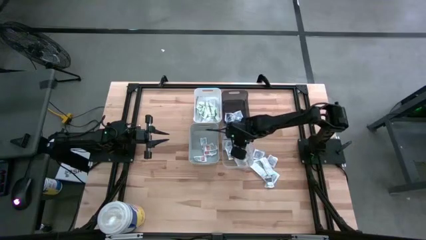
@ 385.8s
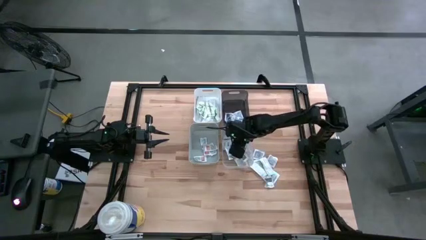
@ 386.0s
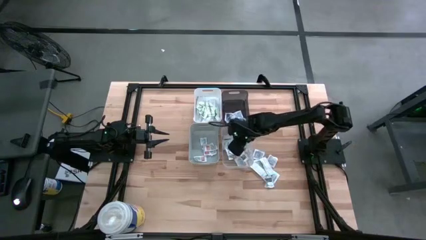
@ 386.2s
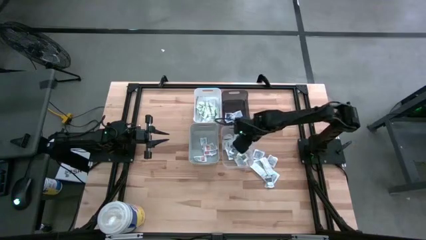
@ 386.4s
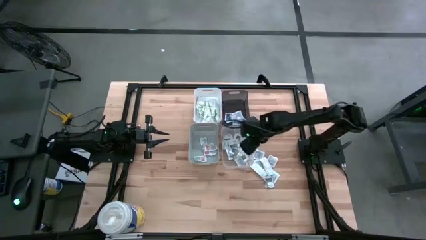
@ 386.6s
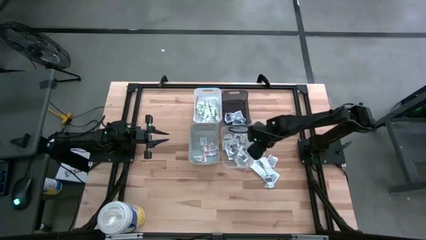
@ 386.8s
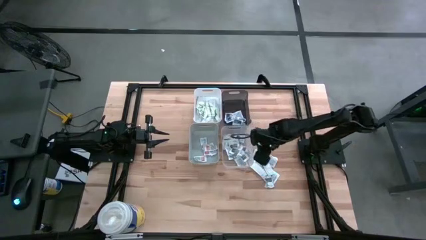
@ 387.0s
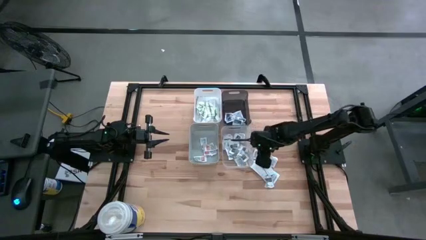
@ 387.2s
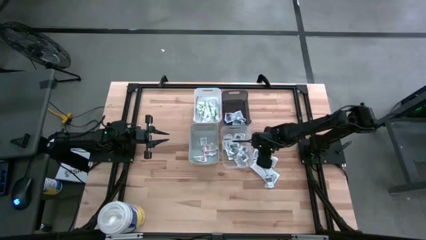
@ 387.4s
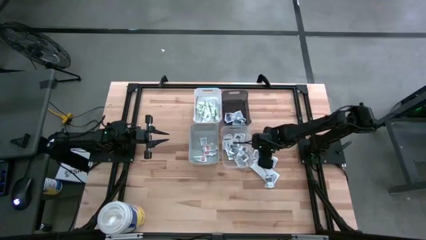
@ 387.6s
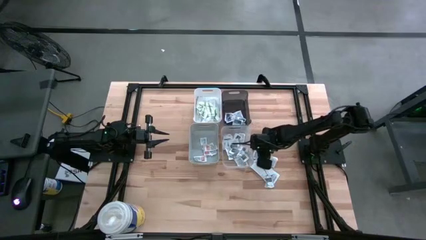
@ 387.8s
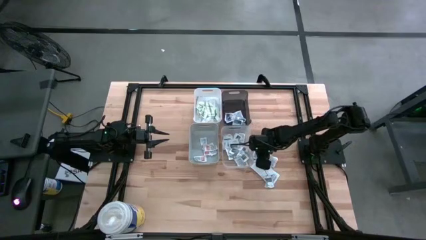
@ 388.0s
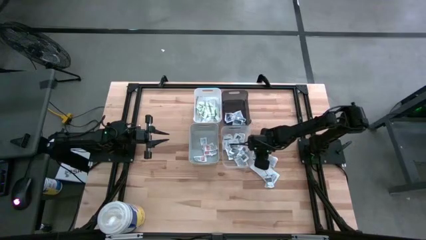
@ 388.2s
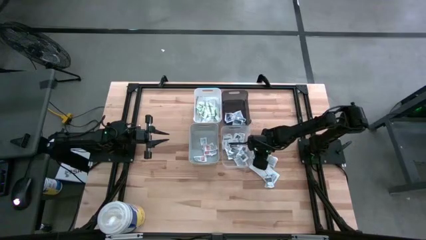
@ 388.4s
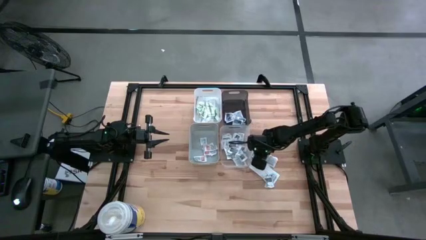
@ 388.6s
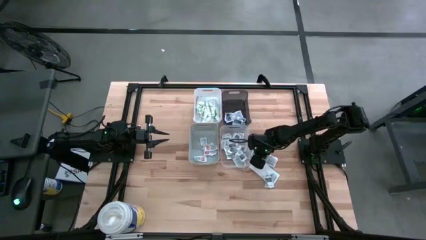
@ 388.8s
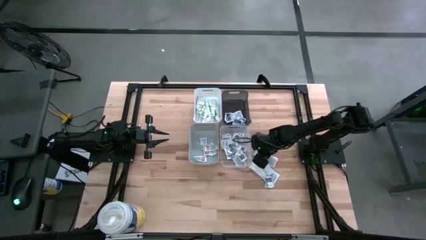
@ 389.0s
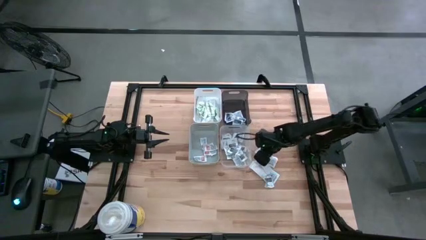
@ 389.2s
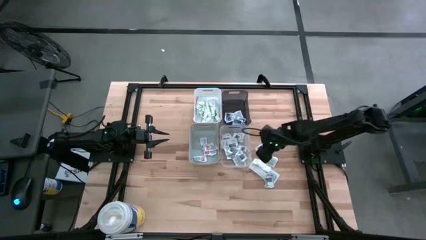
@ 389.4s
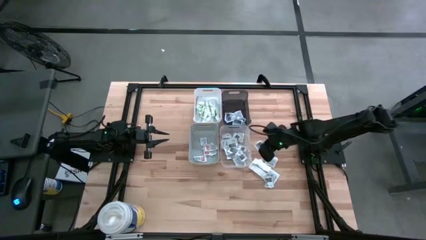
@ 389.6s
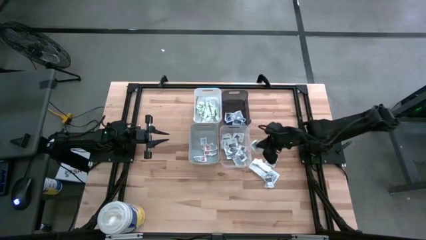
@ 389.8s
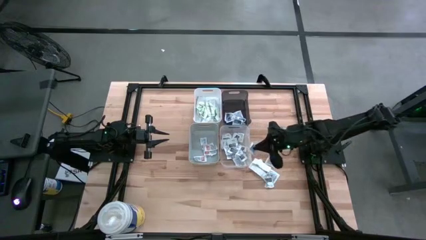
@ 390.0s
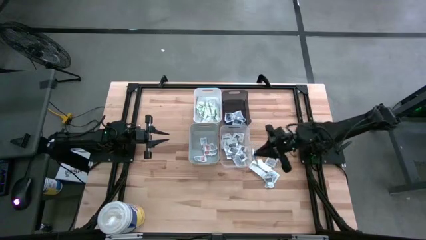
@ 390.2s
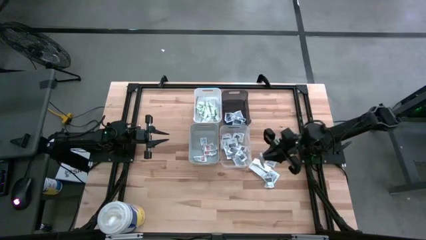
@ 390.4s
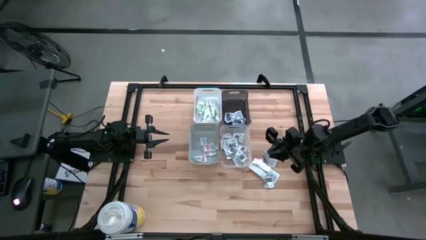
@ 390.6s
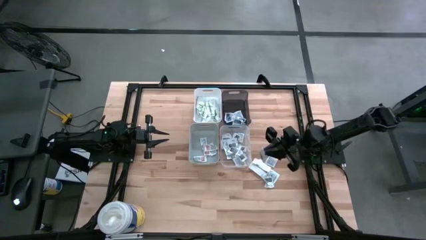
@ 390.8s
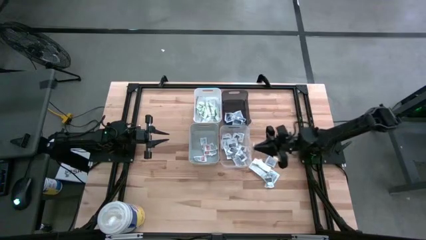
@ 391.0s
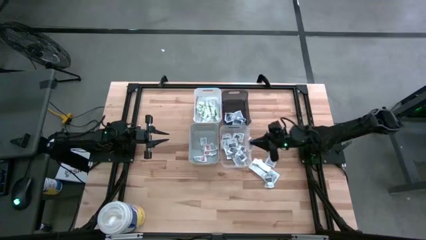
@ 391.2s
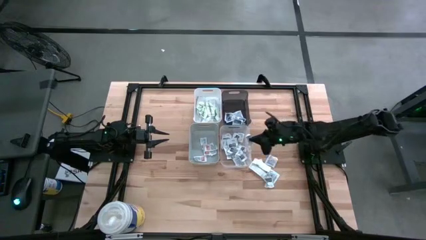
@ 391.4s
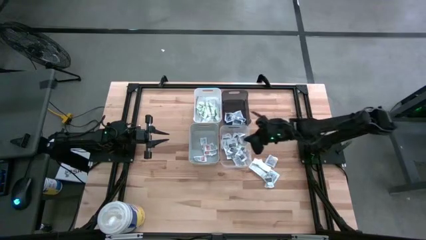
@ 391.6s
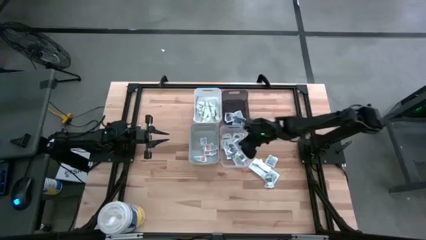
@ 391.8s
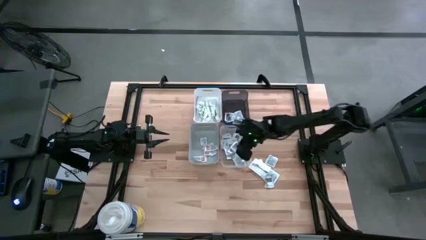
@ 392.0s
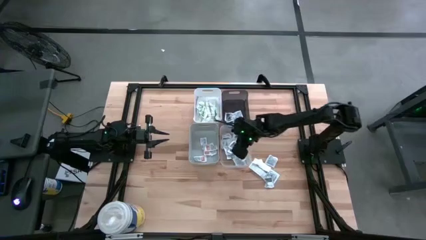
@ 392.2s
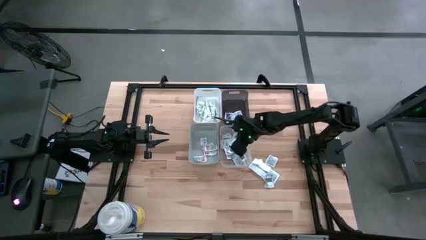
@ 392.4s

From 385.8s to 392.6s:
Task: Pick & Place First Aid Supplies
Put the gray towelette pack into the transparent bin

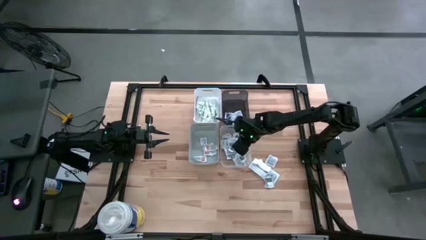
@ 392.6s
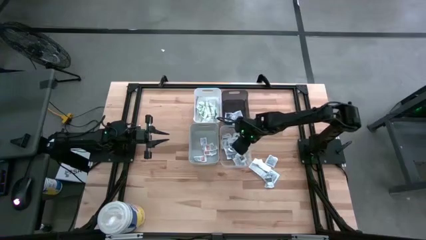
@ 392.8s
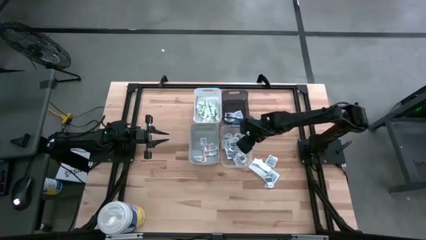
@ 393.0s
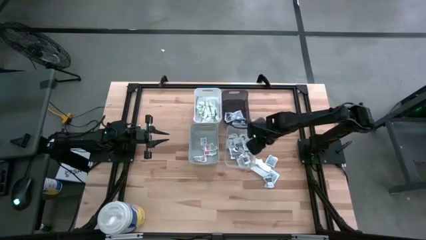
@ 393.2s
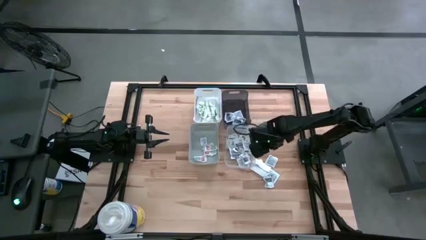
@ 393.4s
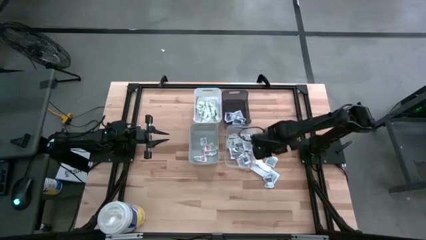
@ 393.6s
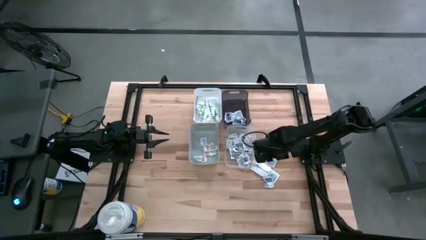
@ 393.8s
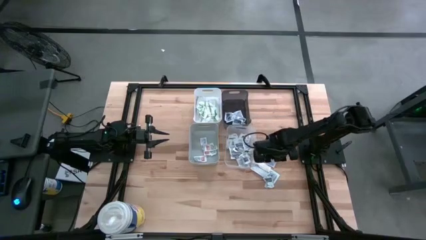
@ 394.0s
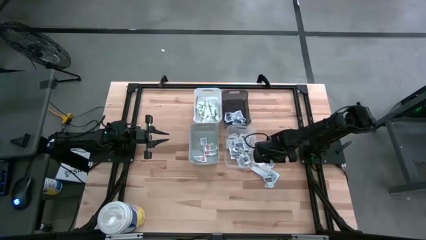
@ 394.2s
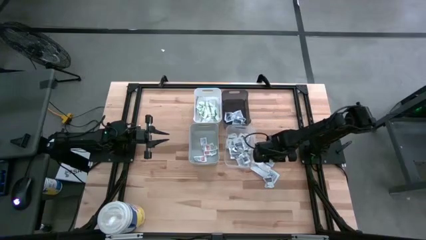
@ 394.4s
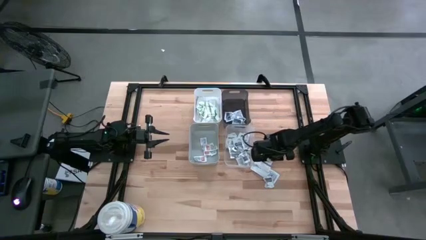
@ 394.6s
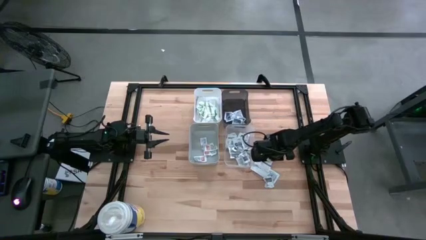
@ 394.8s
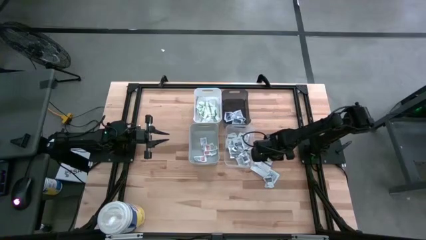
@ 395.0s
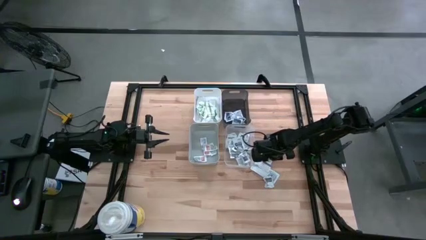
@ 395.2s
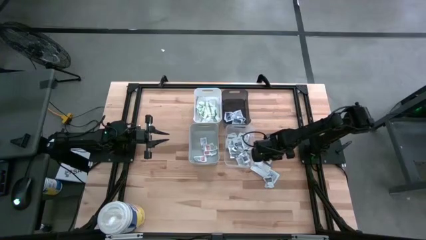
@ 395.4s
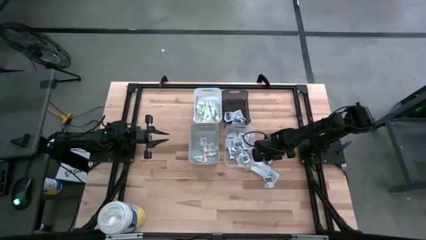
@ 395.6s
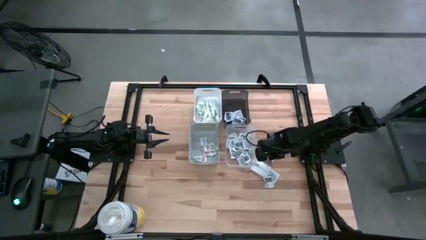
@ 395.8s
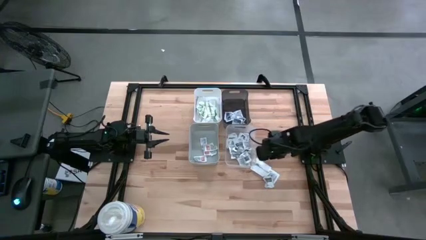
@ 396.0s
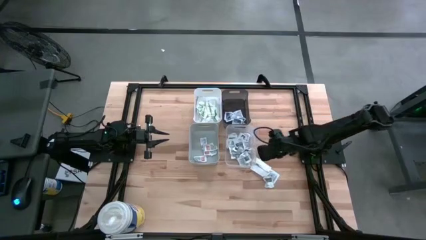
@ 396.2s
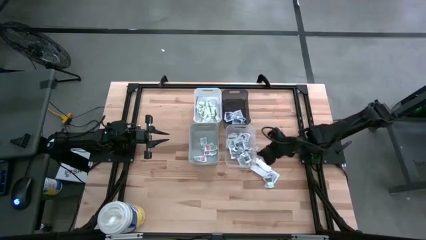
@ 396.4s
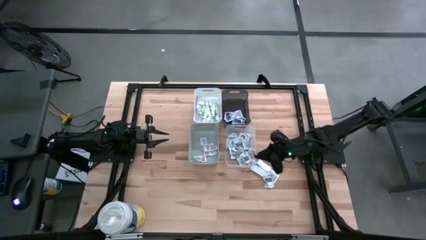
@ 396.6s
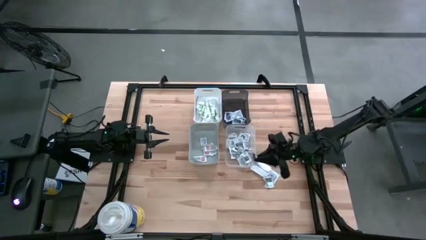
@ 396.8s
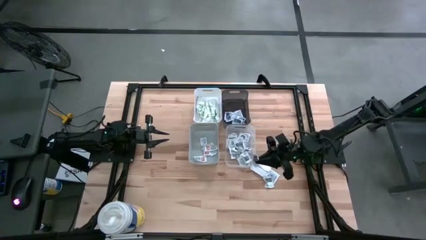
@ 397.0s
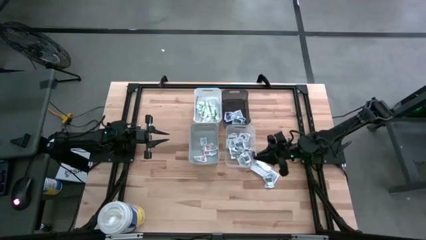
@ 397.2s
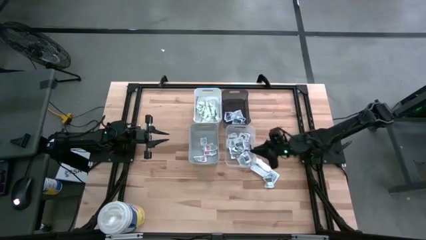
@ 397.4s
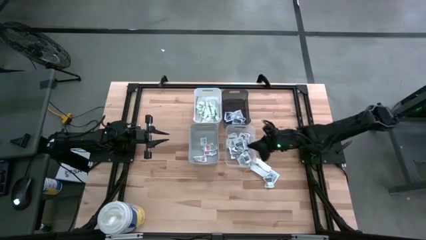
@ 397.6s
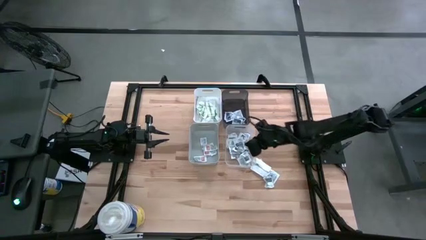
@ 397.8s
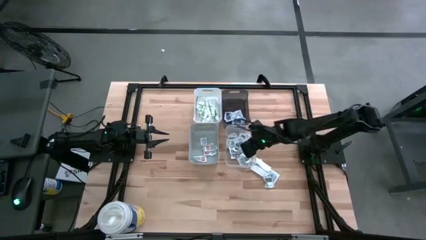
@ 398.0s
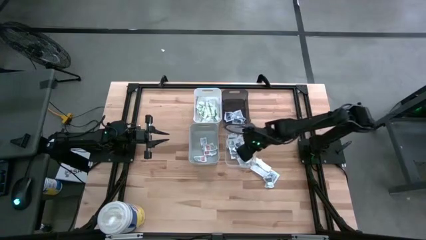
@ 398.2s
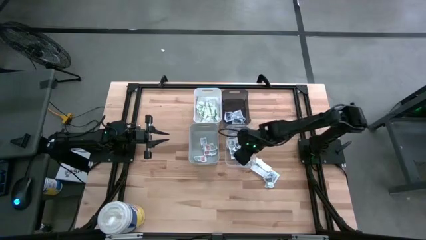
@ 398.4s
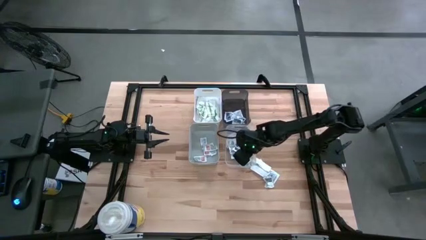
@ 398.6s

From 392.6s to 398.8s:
Put the gray towelette pack into the transparent bin

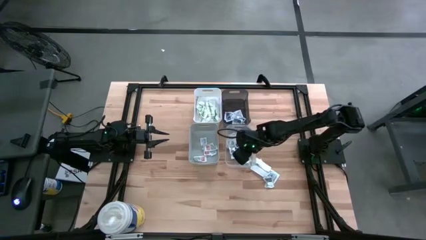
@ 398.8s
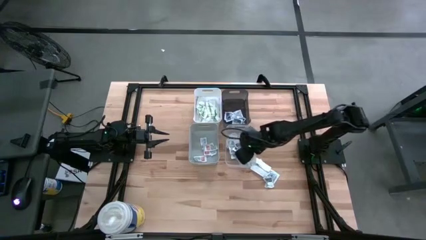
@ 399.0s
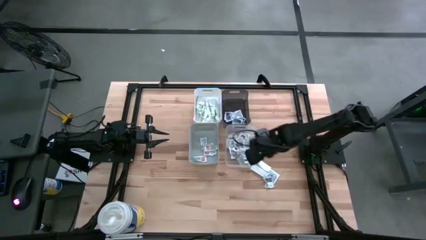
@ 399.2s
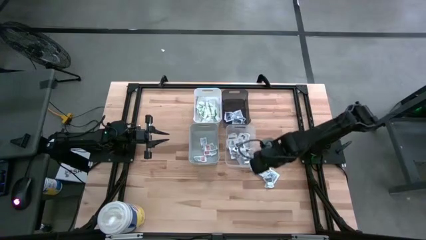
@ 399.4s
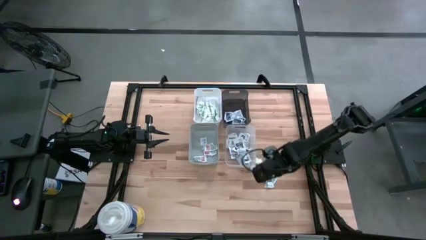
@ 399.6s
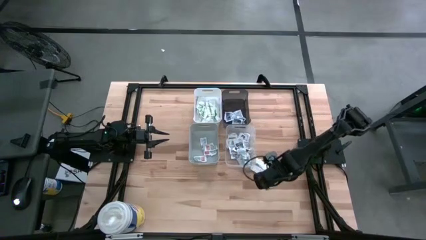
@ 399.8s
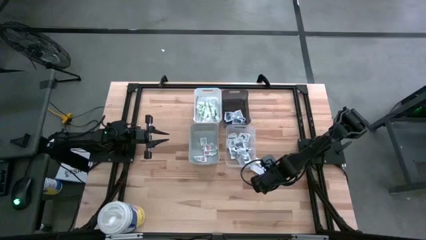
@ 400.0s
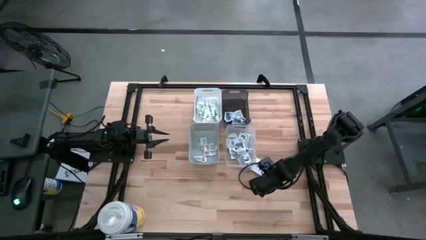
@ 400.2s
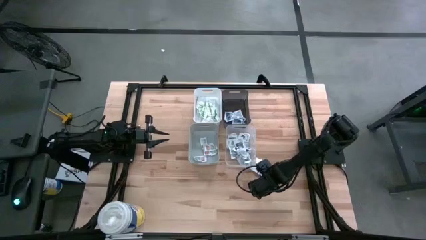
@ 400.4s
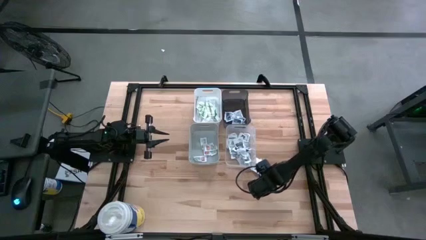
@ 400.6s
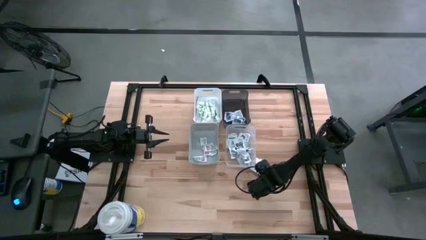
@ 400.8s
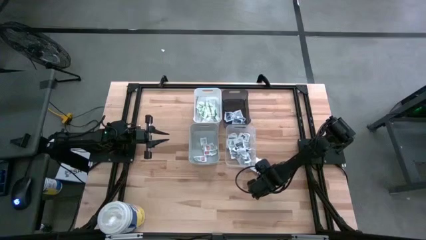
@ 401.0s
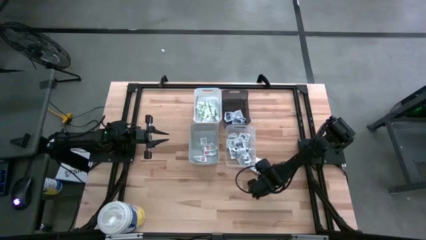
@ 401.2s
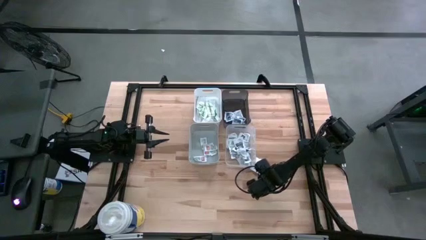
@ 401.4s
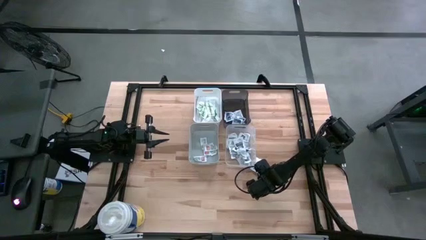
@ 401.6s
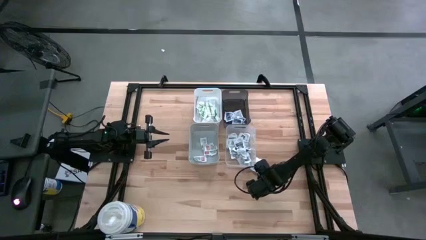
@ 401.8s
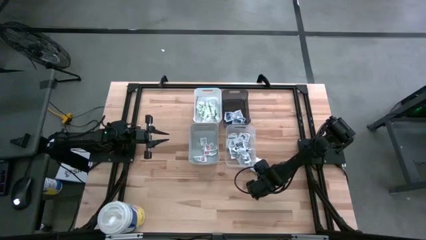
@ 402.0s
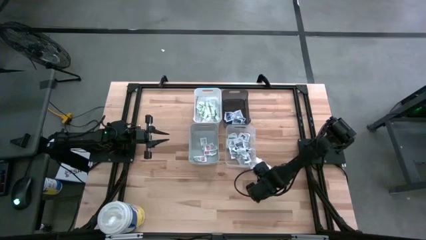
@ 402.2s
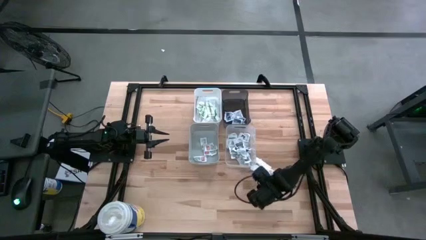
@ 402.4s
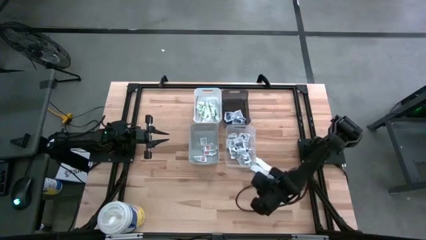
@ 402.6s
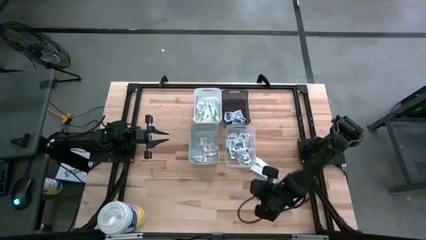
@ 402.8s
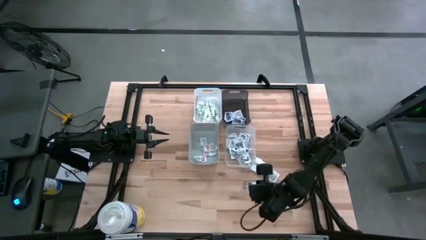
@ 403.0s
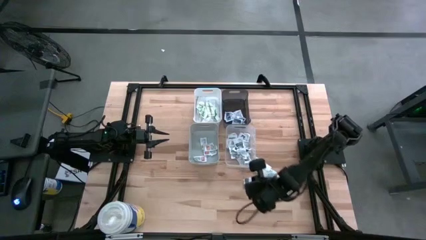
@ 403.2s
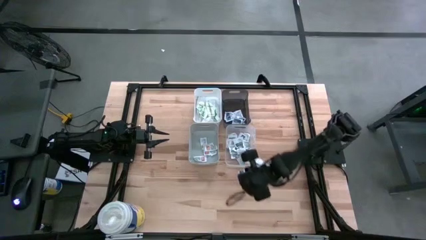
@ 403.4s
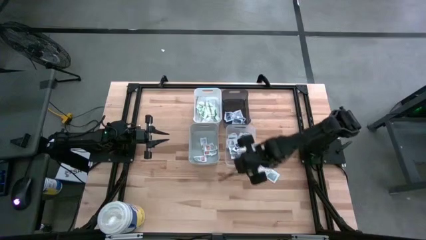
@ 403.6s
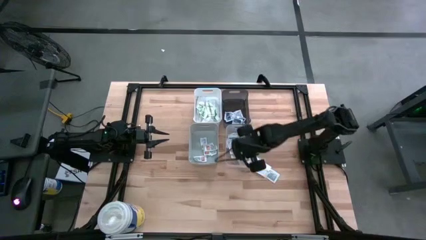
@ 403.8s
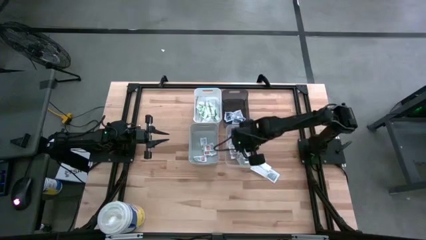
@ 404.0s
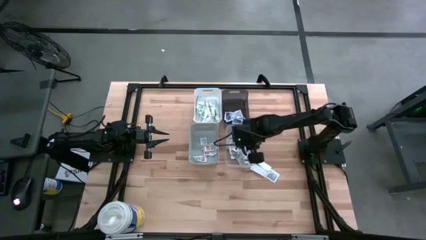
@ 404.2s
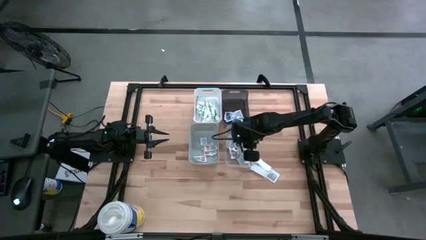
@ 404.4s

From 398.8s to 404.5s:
Put the gray towelette pack into the transparent bin
